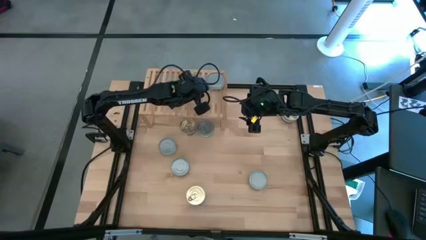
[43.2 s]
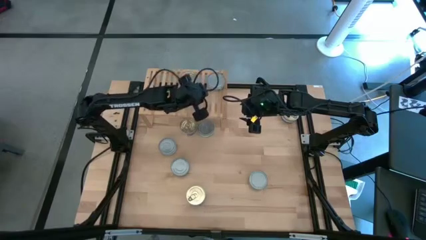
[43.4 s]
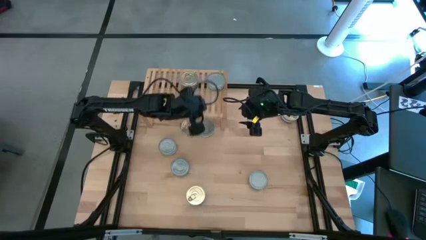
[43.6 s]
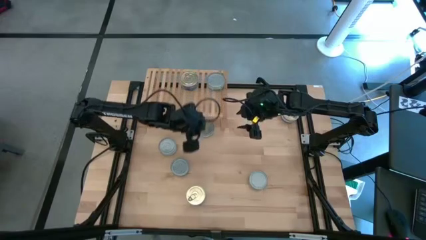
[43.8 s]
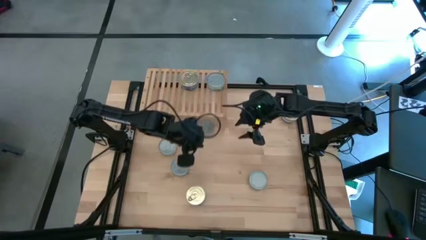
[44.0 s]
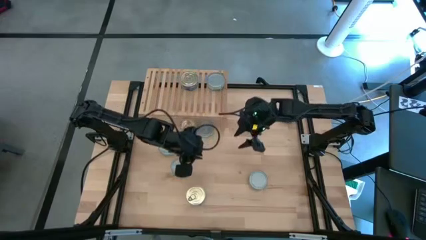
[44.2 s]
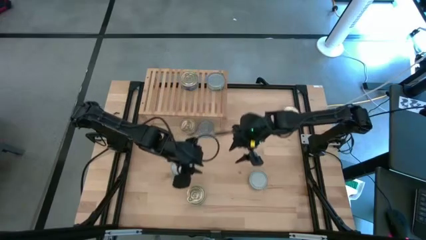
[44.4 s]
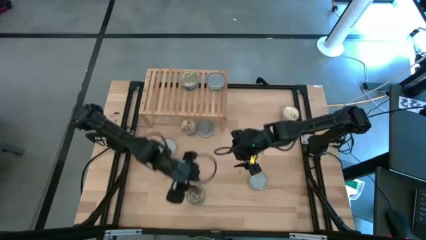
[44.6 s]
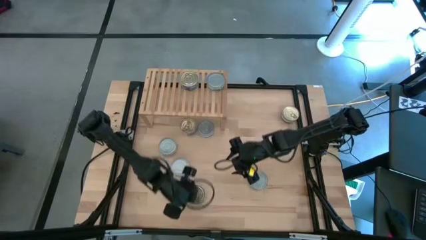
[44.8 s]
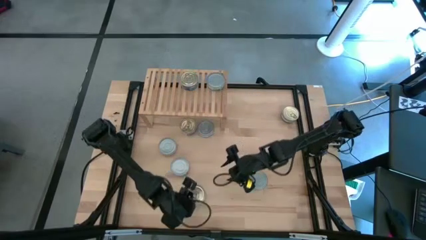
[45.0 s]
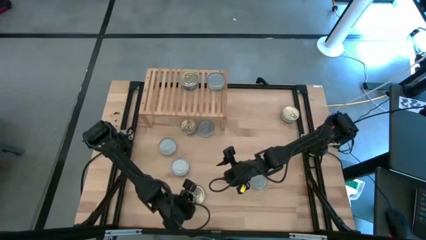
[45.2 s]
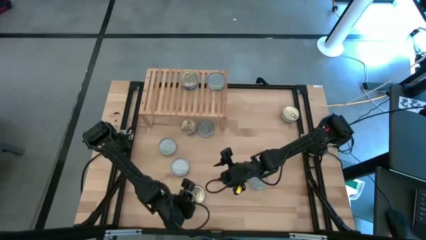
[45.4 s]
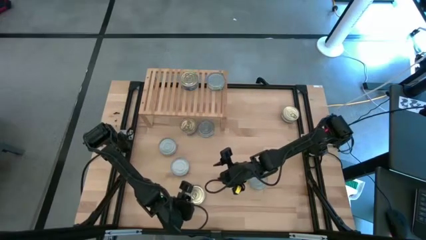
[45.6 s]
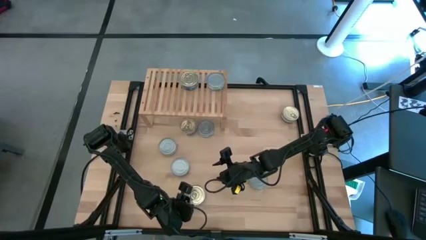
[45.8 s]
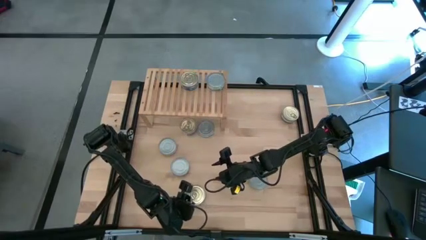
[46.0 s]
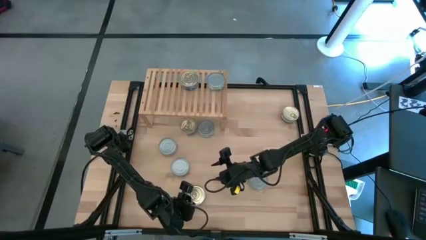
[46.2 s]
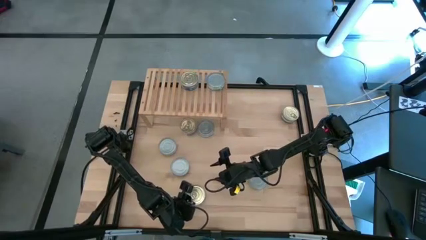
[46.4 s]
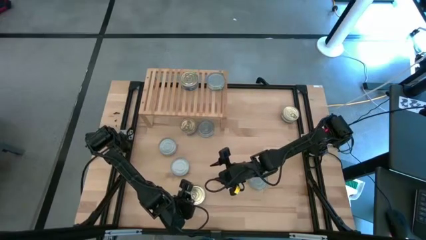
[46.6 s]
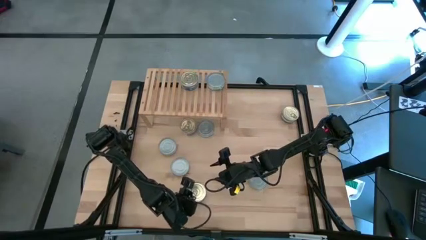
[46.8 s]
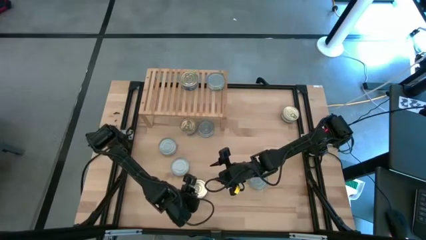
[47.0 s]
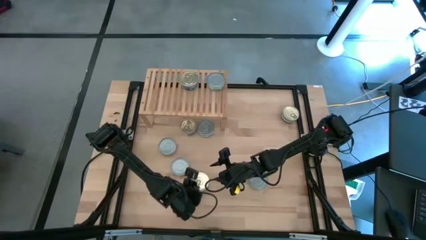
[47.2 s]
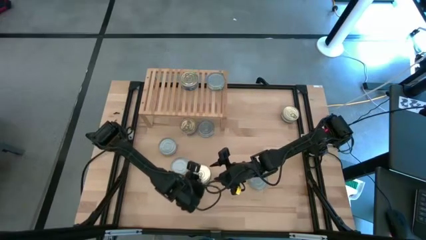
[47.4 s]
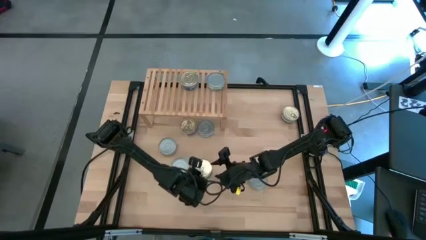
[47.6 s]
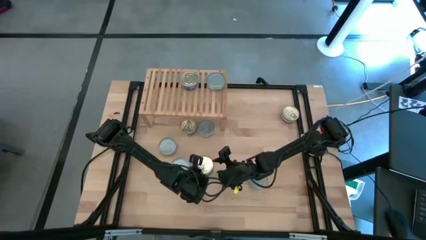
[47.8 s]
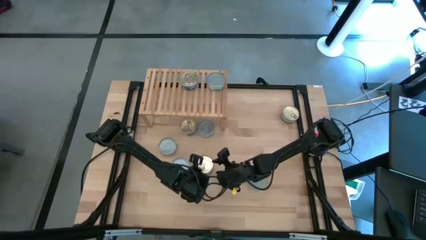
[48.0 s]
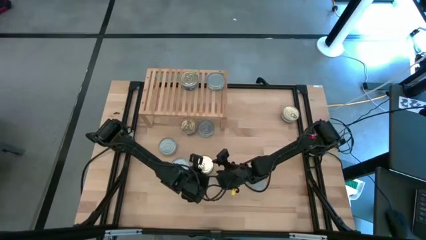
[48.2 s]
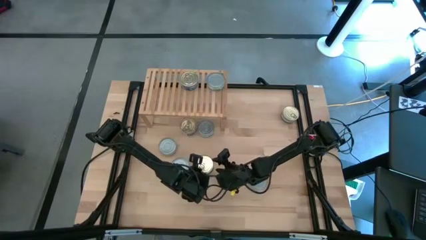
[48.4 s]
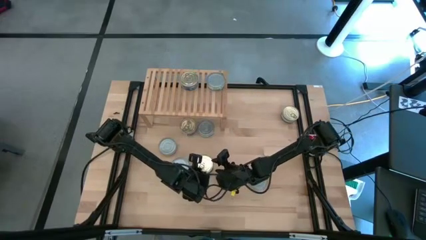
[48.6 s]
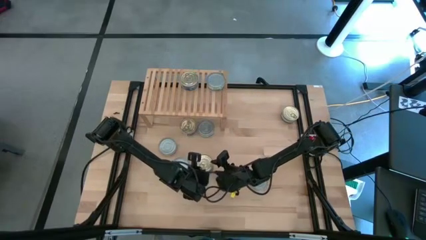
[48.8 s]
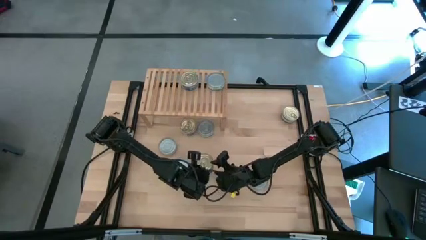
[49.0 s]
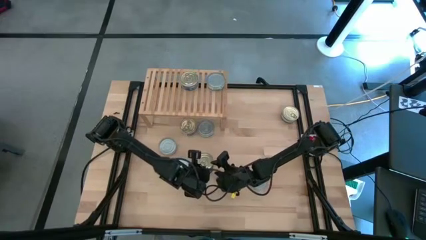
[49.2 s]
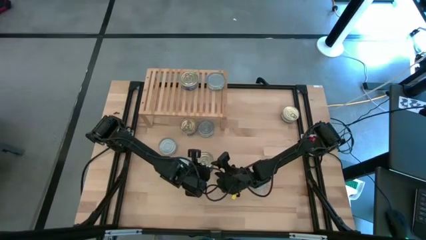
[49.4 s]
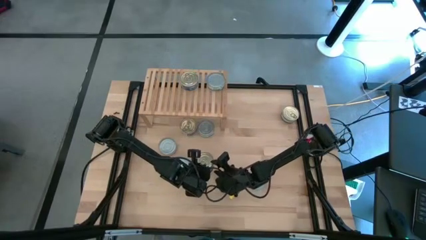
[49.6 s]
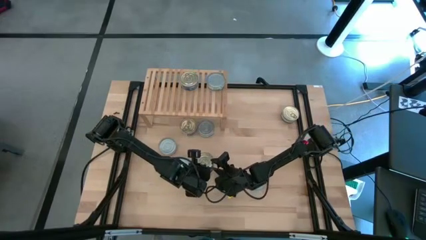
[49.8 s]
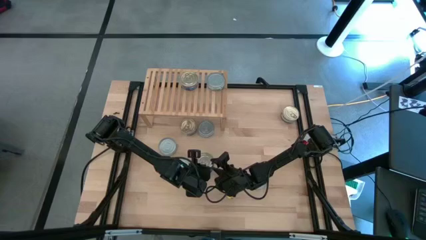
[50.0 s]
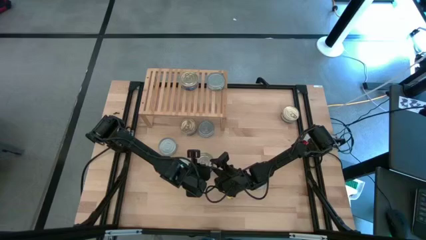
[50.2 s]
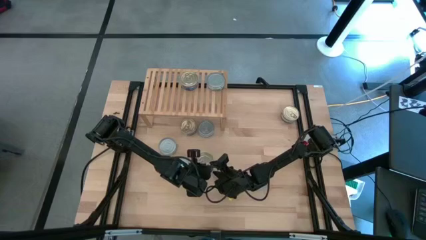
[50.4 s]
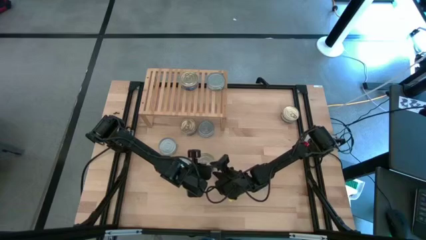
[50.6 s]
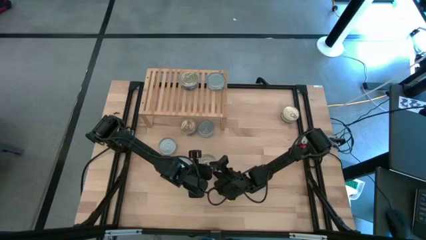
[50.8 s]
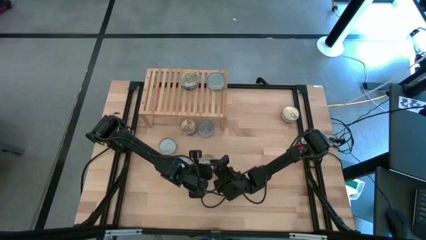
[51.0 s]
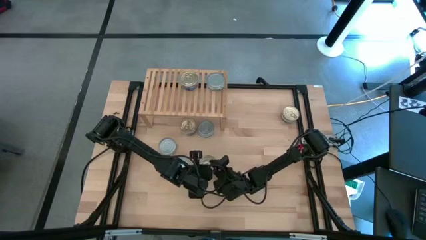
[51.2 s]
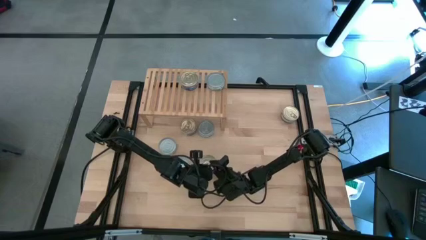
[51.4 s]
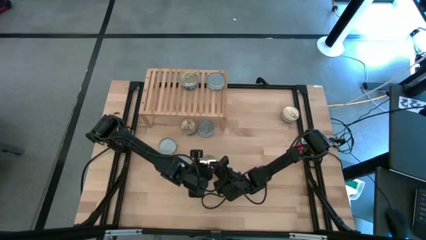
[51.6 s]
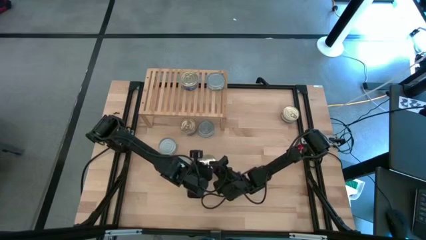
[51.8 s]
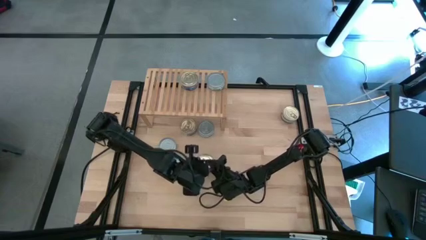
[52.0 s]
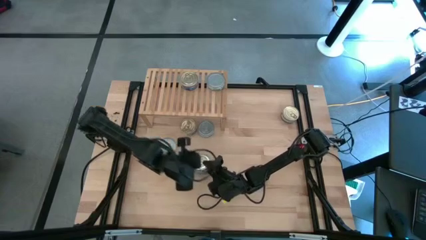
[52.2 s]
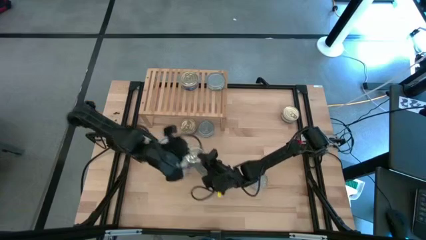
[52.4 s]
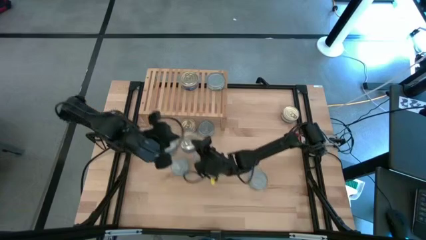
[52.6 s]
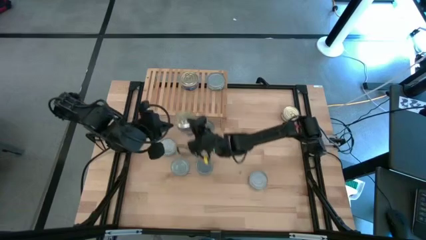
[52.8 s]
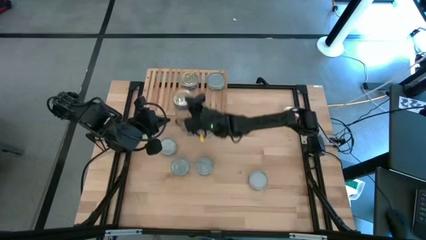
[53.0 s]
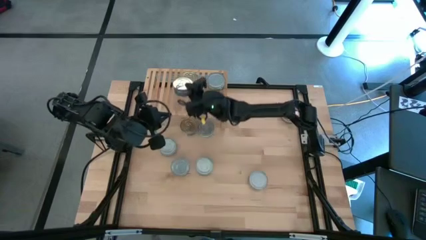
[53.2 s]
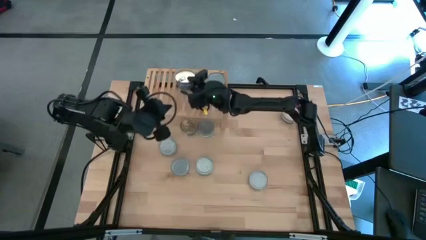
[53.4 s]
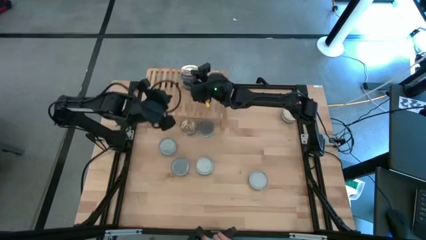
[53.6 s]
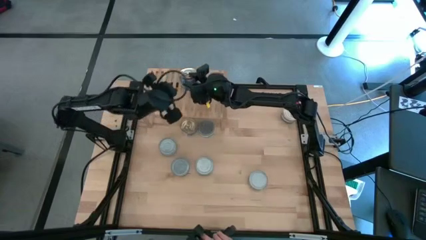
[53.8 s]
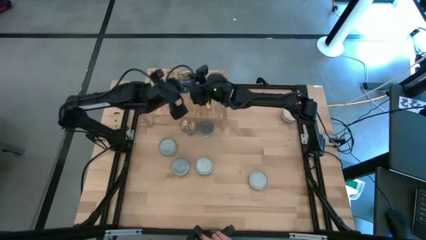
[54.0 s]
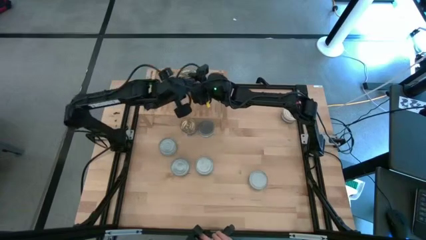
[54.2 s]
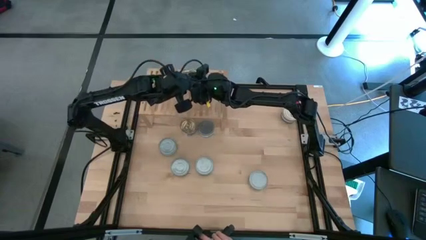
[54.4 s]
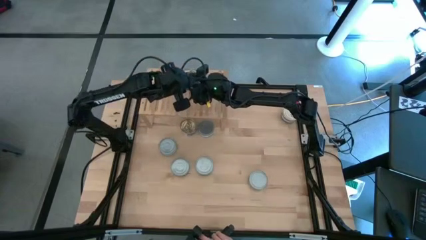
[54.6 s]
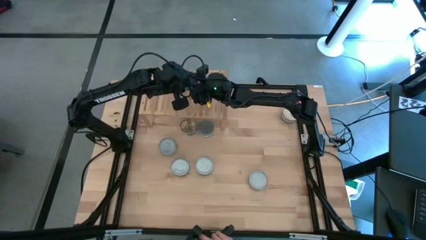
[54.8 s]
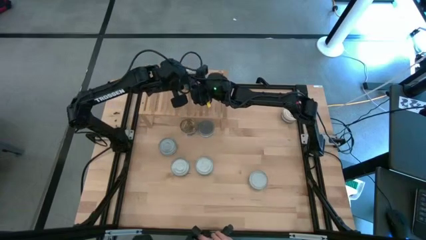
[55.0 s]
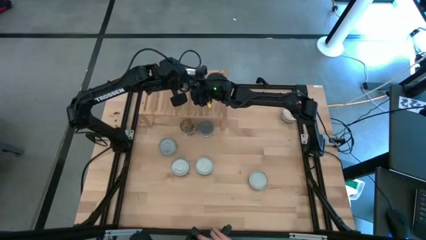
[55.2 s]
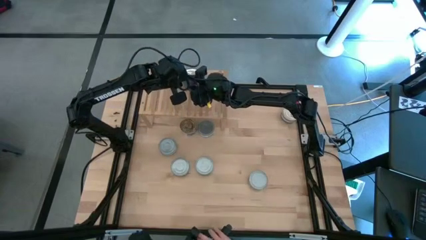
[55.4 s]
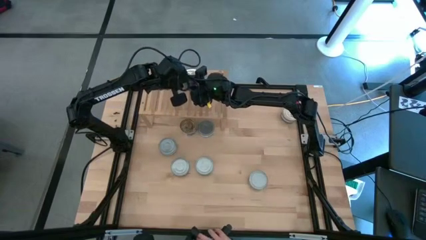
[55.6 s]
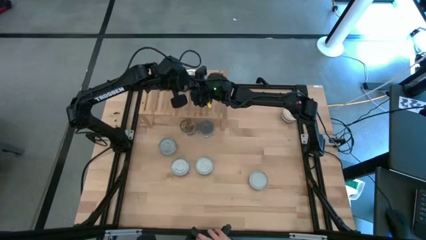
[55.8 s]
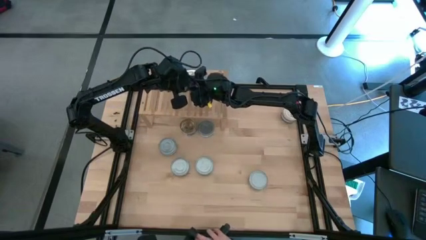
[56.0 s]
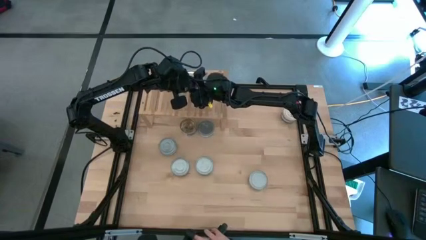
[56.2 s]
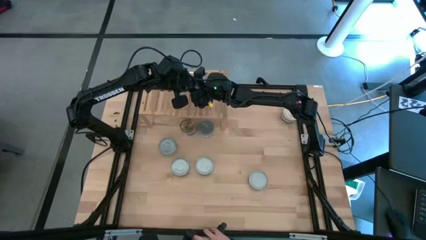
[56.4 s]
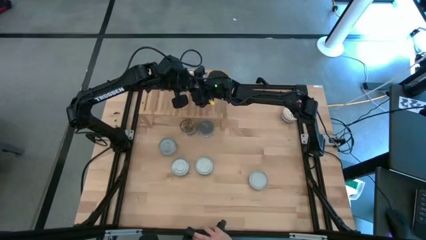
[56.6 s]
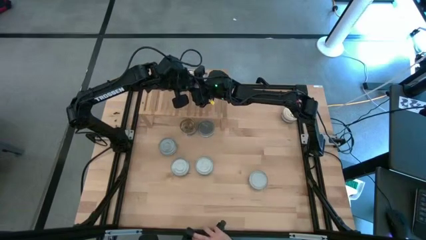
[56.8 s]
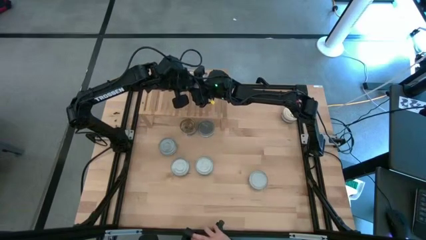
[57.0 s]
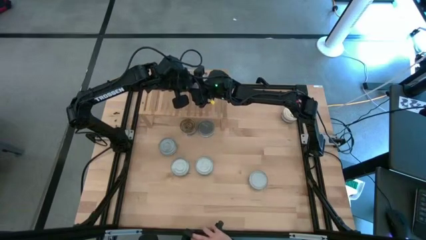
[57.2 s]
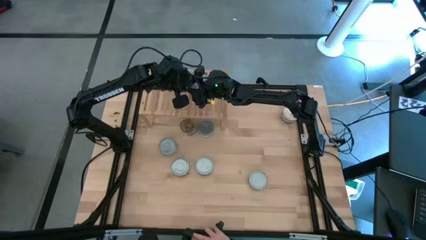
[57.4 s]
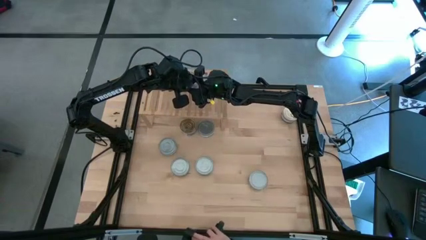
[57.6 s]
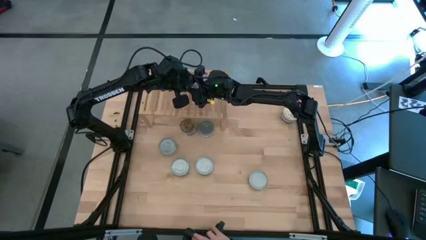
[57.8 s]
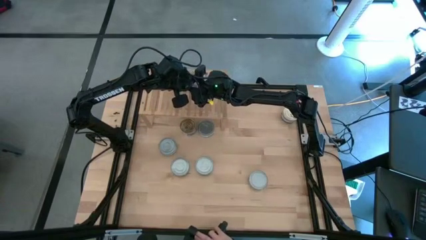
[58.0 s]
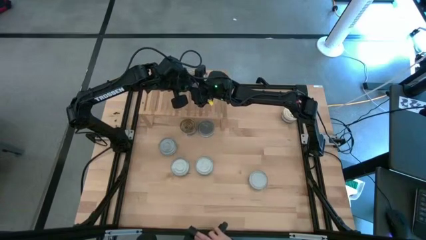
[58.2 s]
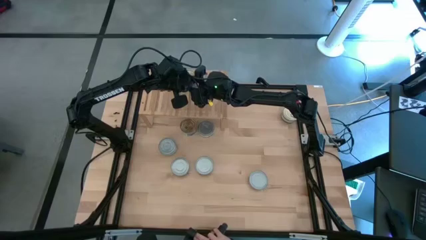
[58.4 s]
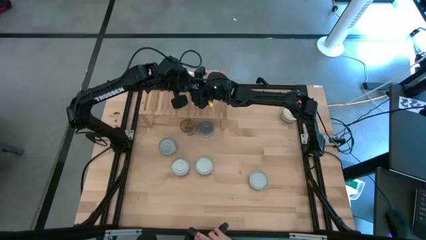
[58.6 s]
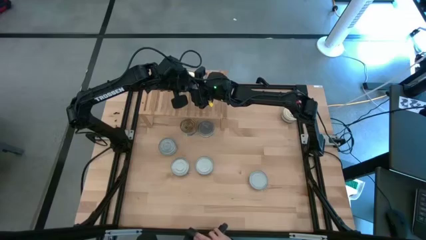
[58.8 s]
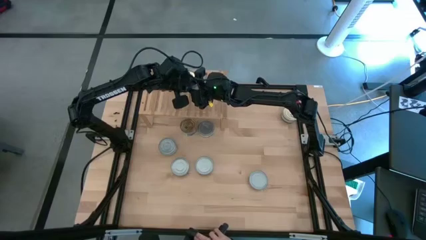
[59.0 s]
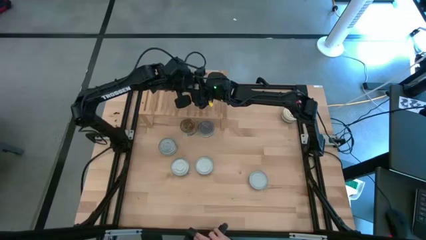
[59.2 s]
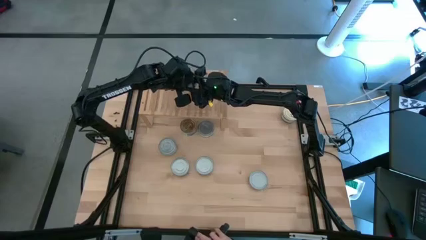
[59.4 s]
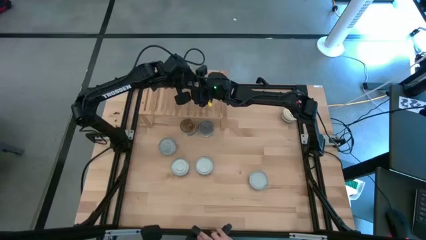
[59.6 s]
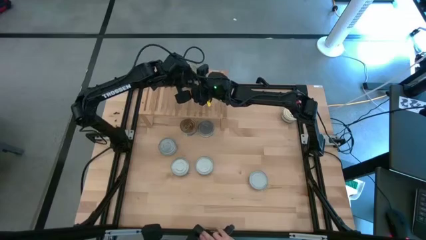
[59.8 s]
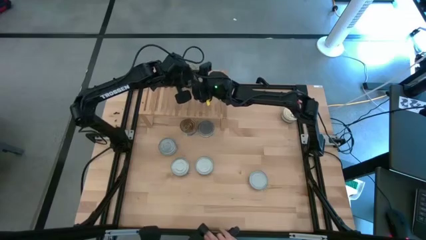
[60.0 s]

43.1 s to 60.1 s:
Task: Stack canned seafood by type on shelf
Stack the blue tuna can on top of the blue tuna can on the shelf
